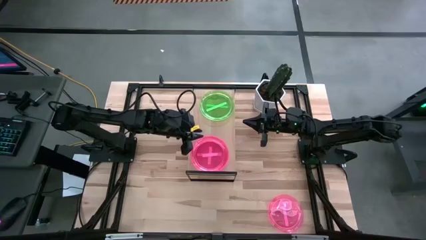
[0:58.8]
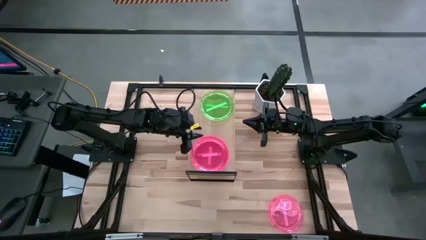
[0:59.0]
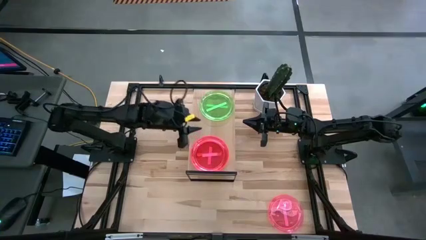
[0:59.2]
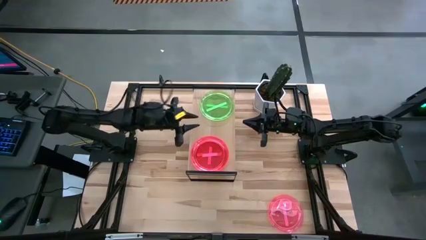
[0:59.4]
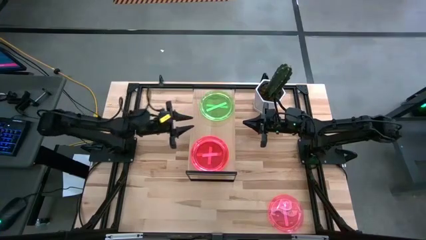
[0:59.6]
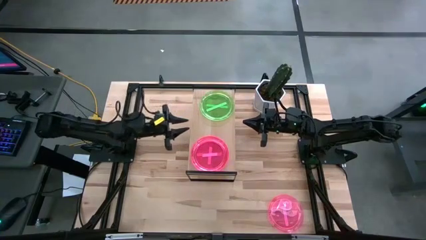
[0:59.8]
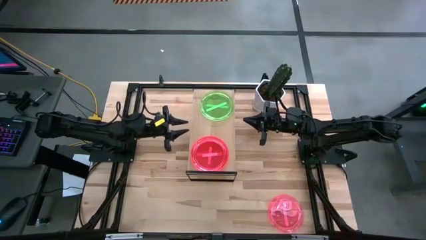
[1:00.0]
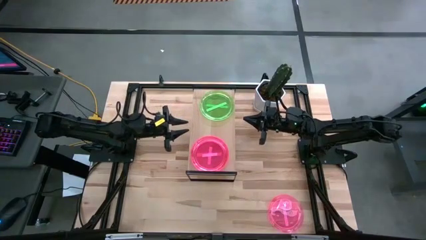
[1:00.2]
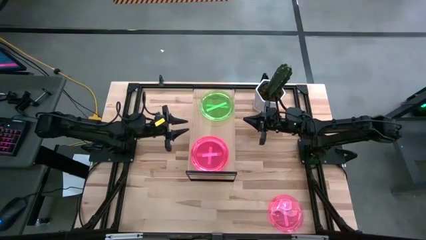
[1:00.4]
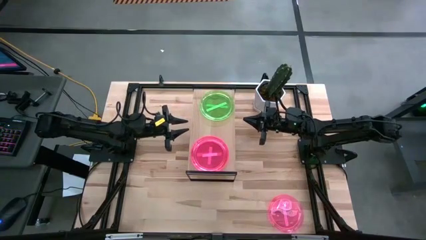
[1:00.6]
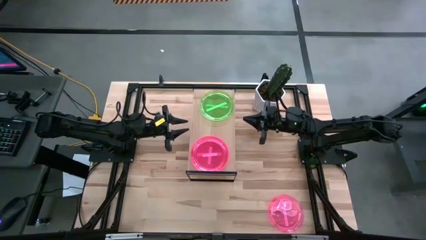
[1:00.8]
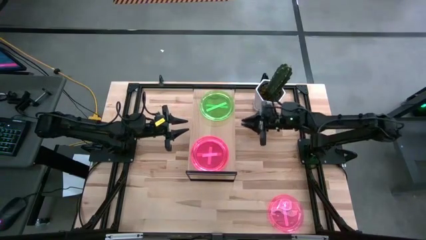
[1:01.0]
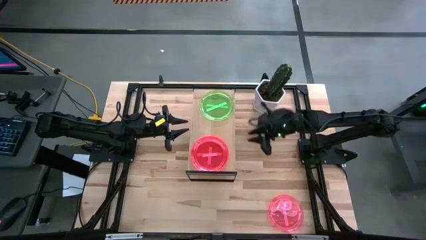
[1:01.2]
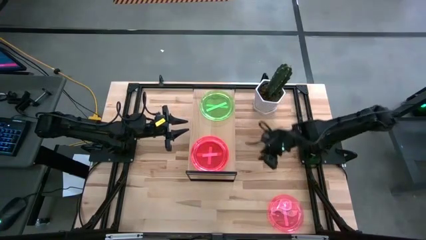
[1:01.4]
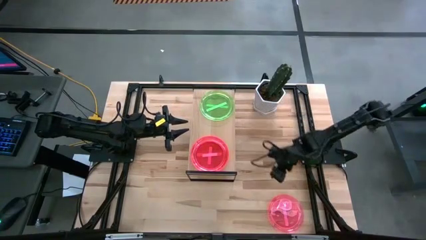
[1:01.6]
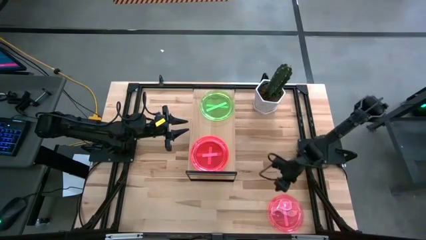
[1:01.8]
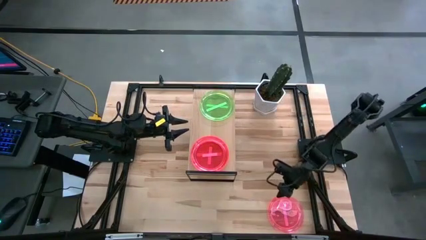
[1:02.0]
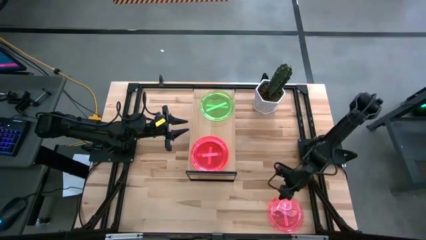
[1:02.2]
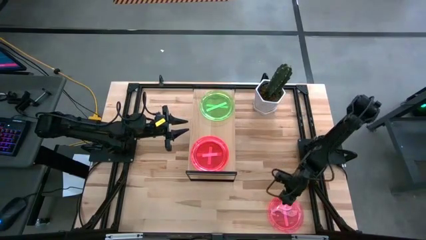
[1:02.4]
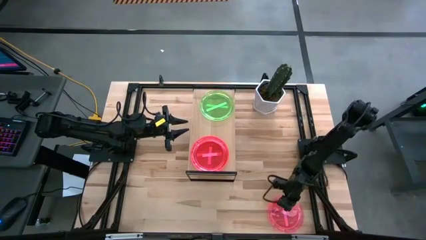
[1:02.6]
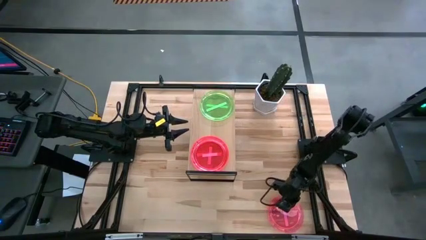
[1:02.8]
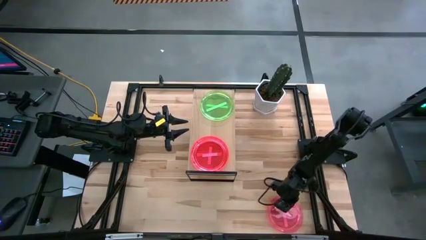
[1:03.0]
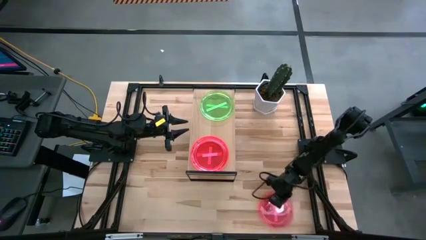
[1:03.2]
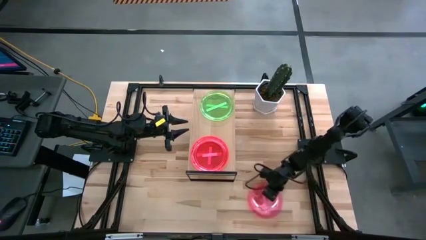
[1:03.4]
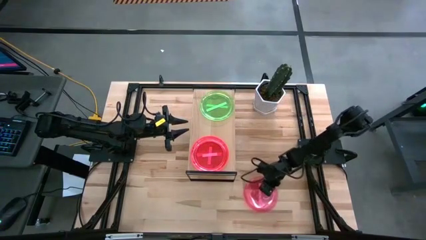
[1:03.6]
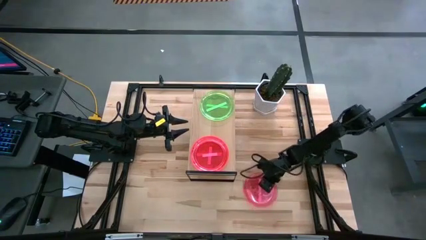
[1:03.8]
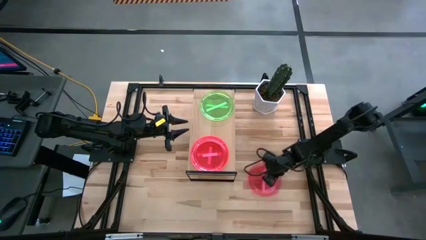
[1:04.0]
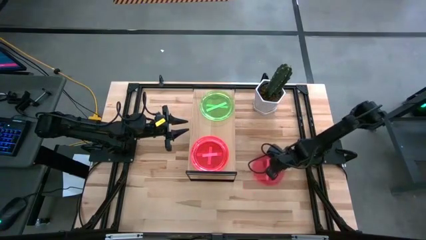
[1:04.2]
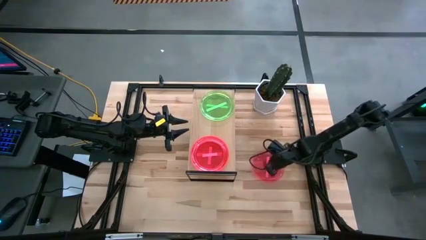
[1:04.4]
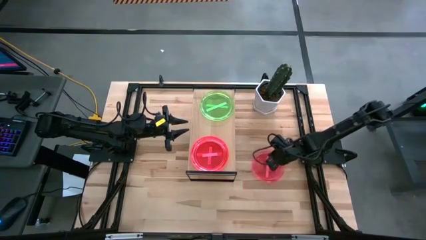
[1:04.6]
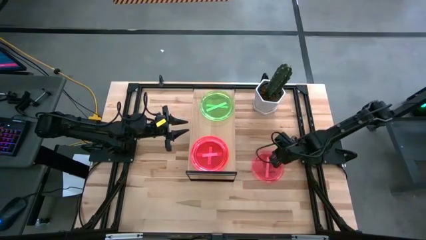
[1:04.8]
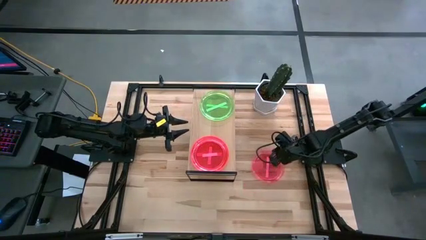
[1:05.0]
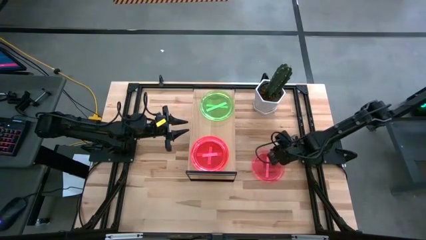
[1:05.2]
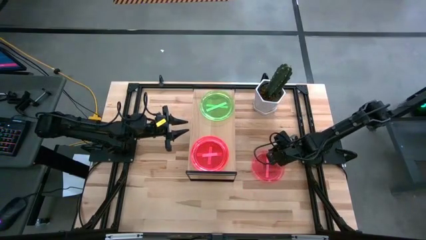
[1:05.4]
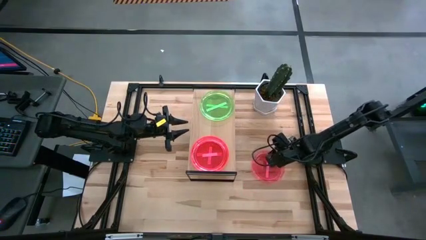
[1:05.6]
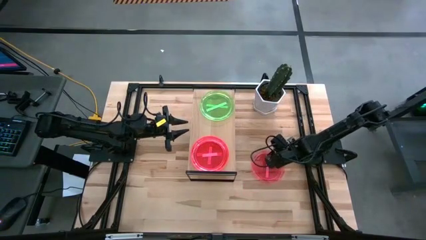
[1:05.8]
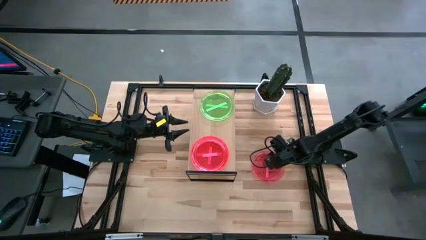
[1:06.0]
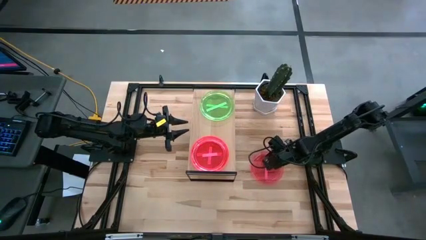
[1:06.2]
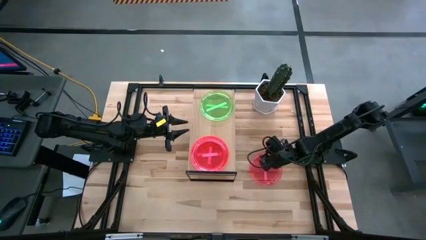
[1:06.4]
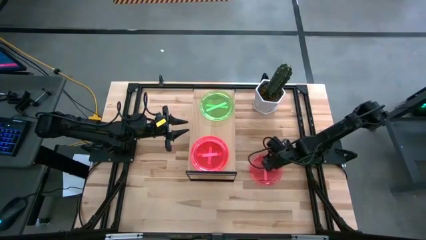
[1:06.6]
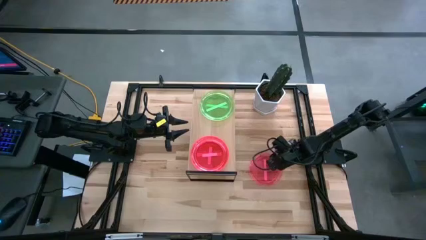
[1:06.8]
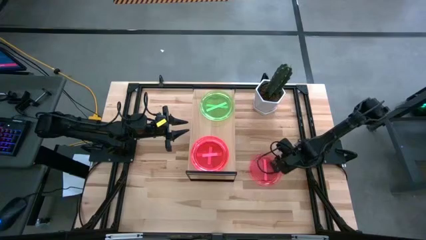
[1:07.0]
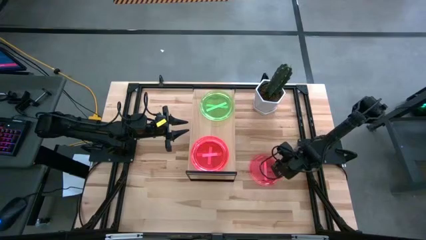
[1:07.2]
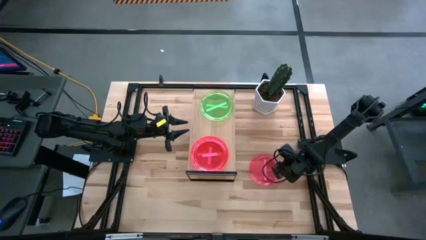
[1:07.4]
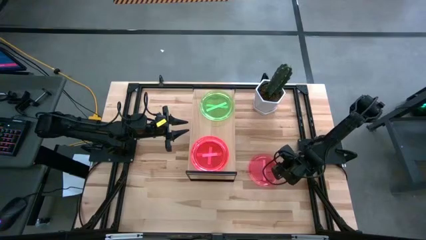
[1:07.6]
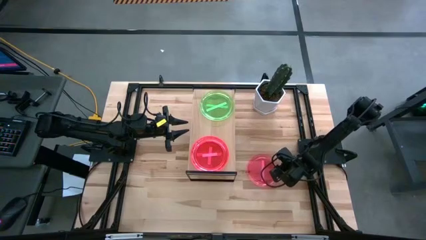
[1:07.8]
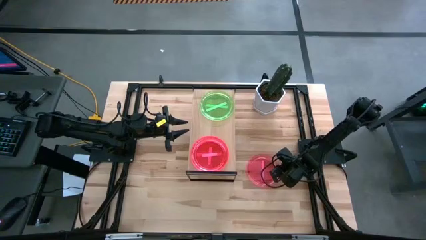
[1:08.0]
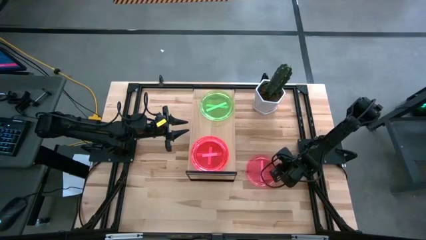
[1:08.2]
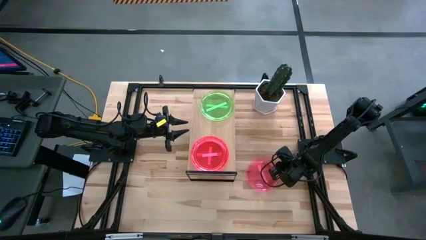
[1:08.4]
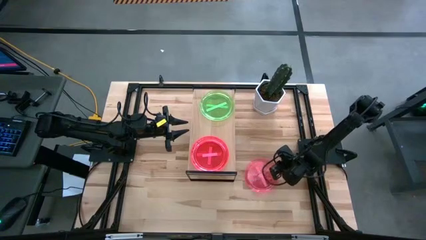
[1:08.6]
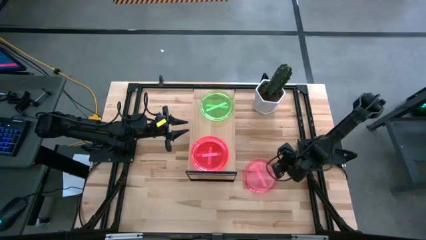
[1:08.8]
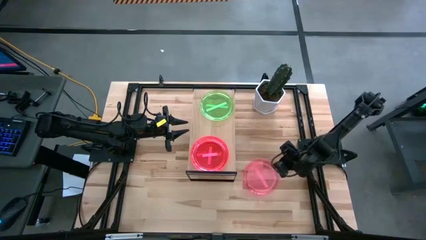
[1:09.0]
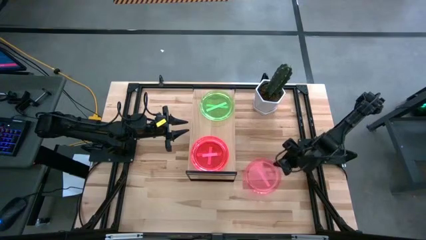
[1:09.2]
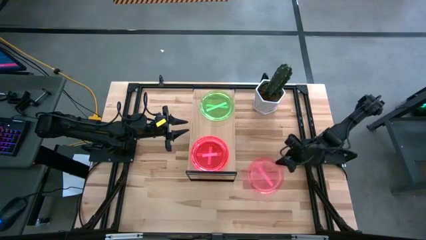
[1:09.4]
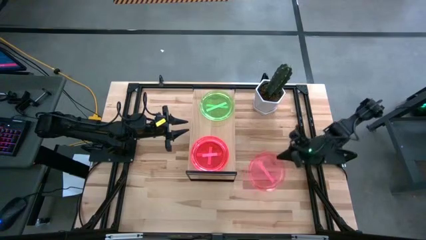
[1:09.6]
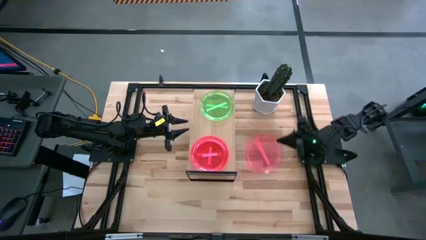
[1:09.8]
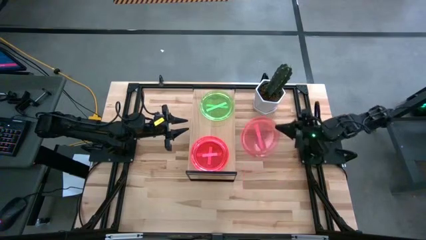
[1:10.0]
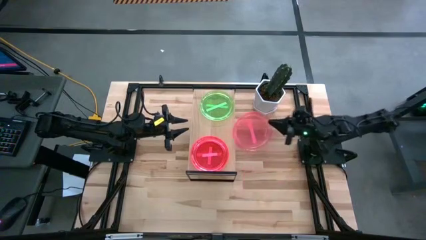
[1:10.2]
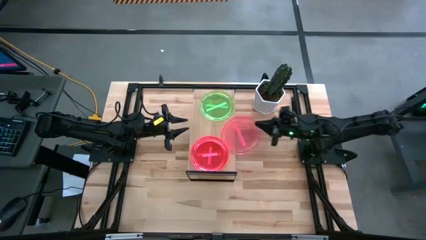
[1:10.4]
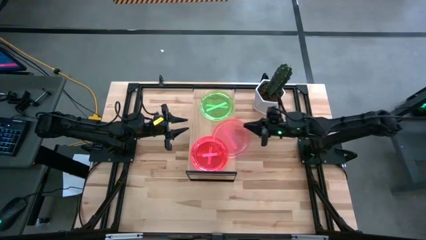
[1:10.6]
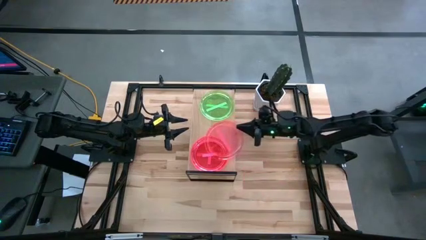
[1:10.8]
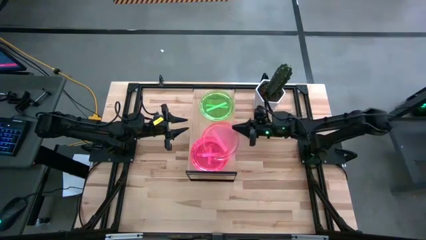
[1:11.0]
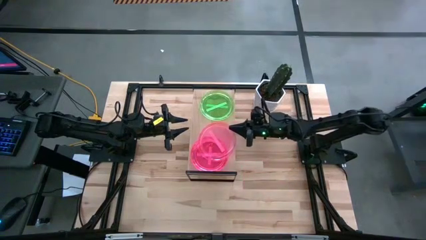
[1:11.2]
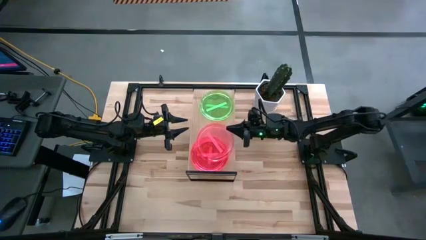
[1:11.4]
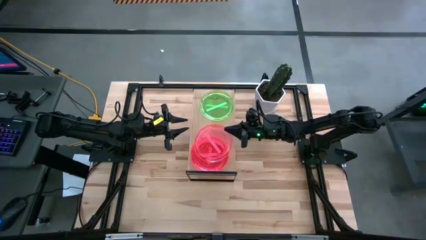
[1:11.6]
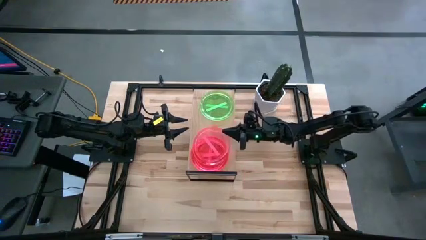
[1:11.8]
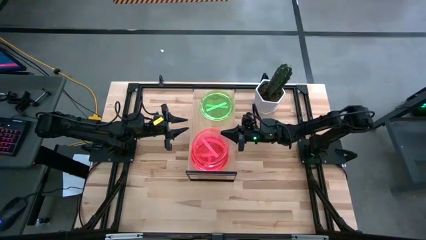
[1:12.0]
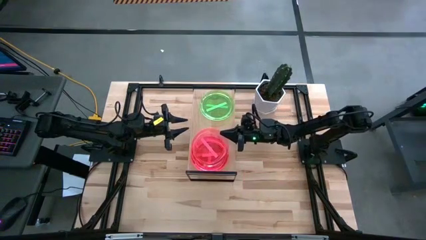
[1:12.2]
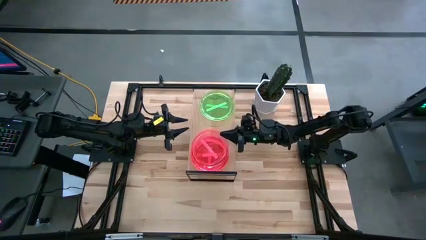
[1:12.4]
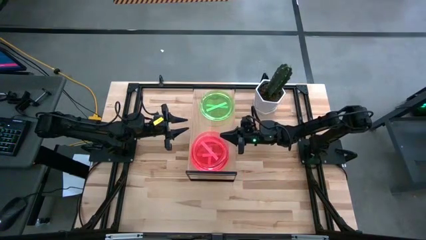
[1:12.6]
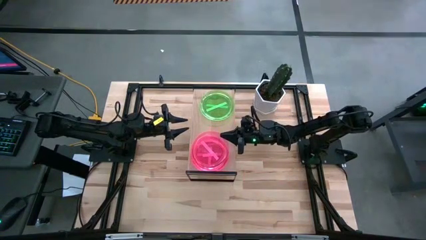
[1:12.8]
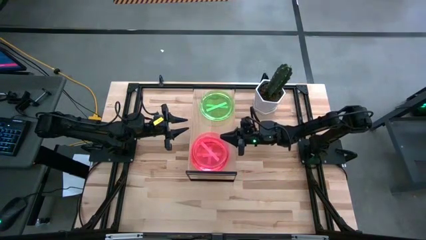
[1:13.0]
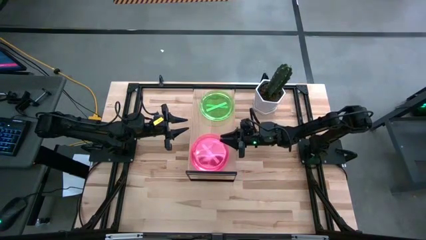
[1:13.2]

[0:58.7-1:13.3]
Task: Place and stack plates onto a shelf
Stack the pink plate on top of the pink plate on the shelf
